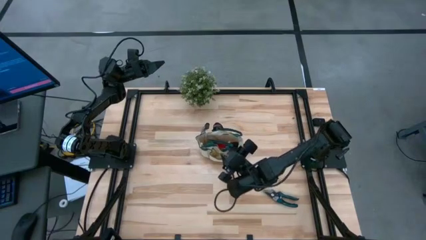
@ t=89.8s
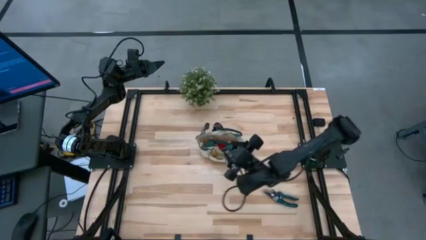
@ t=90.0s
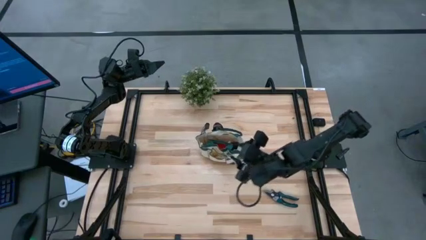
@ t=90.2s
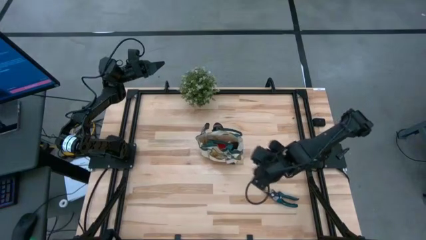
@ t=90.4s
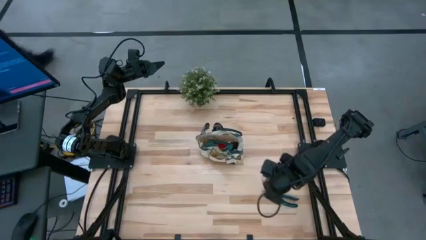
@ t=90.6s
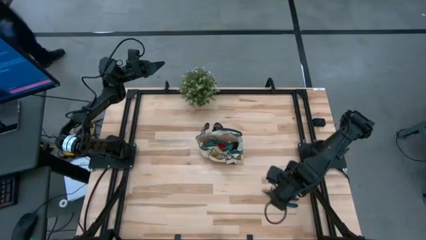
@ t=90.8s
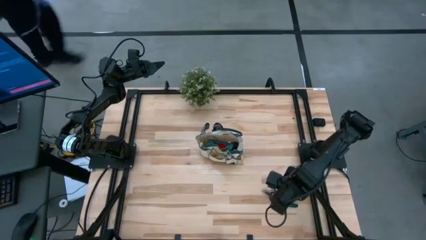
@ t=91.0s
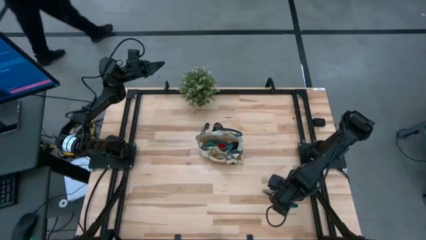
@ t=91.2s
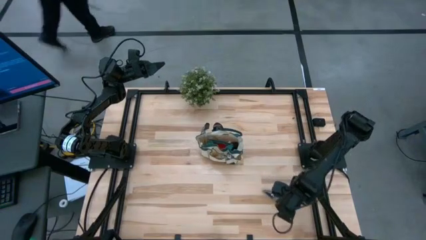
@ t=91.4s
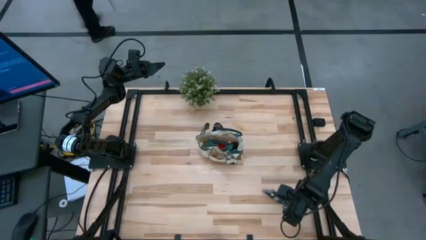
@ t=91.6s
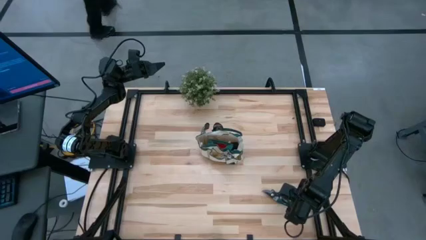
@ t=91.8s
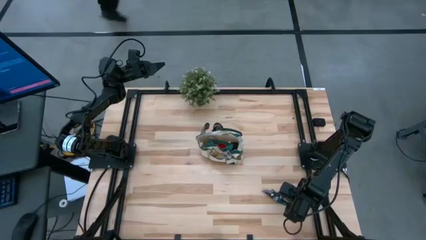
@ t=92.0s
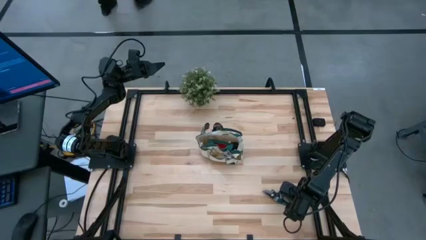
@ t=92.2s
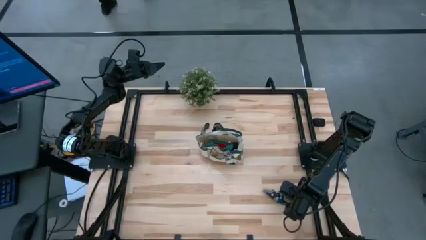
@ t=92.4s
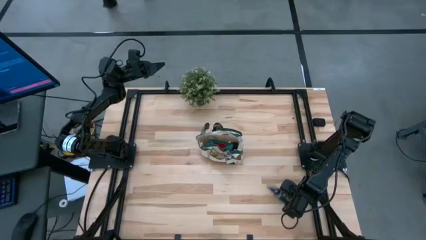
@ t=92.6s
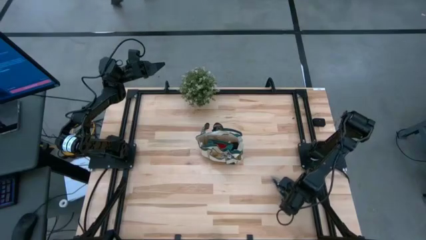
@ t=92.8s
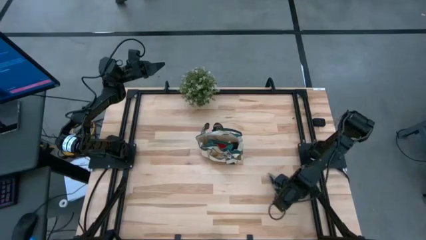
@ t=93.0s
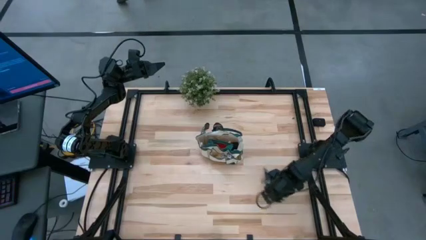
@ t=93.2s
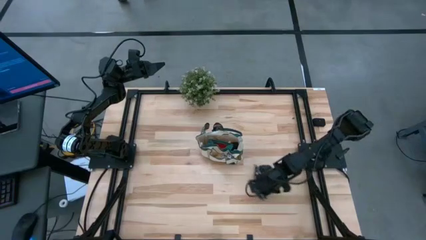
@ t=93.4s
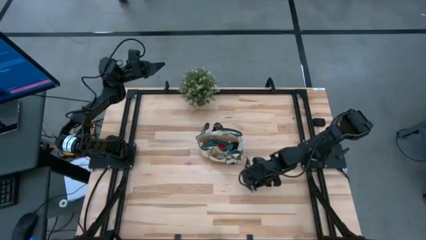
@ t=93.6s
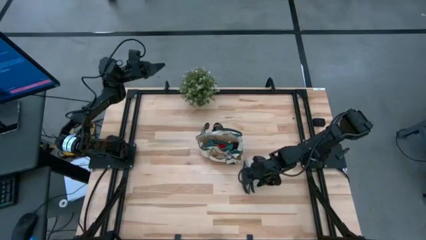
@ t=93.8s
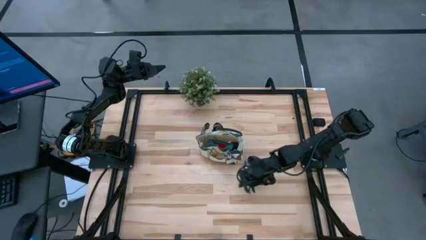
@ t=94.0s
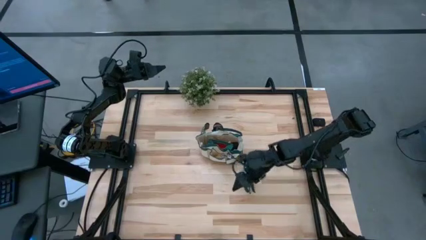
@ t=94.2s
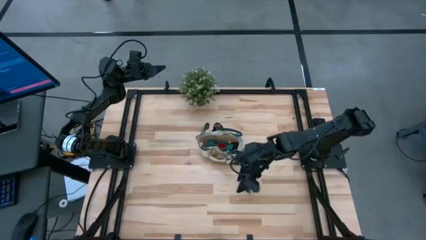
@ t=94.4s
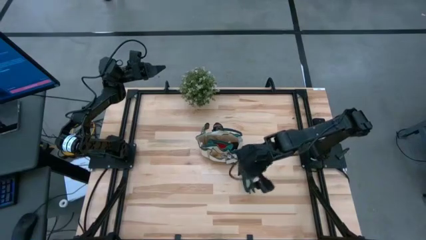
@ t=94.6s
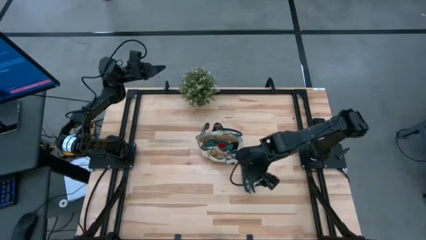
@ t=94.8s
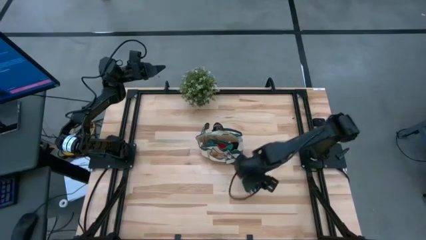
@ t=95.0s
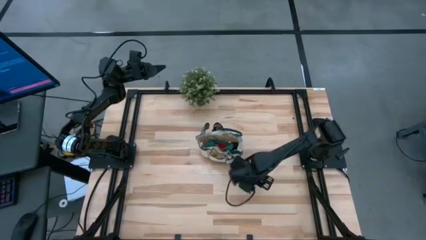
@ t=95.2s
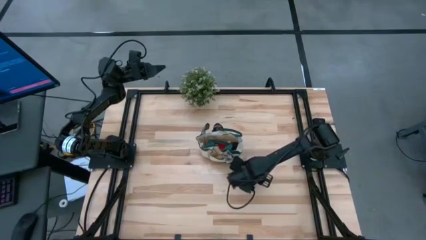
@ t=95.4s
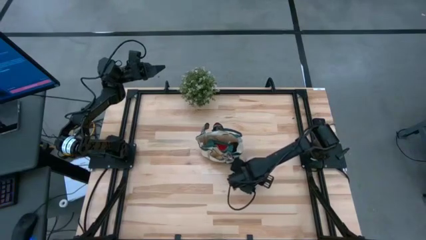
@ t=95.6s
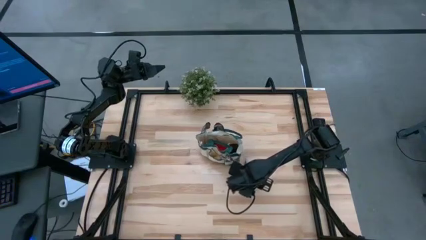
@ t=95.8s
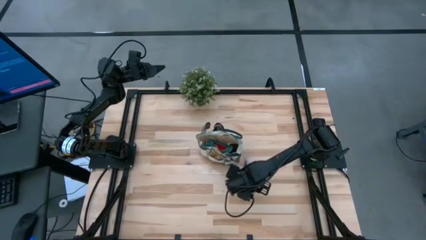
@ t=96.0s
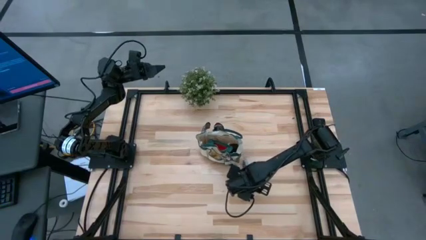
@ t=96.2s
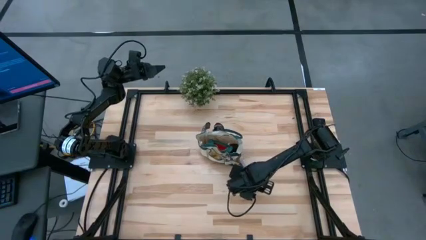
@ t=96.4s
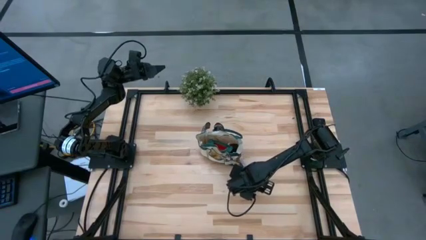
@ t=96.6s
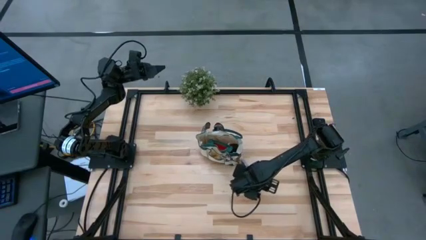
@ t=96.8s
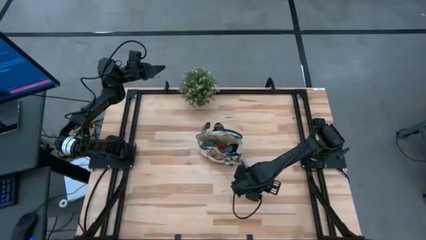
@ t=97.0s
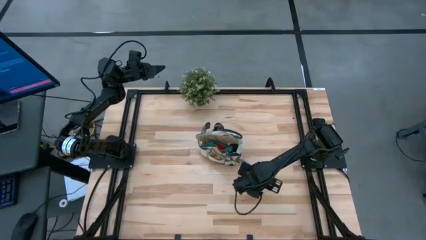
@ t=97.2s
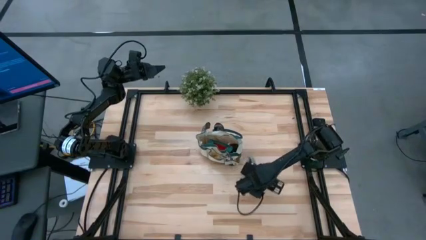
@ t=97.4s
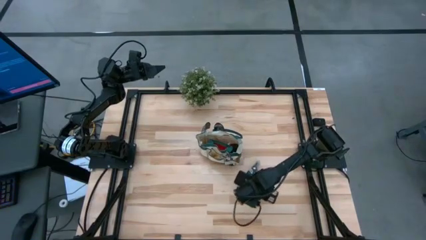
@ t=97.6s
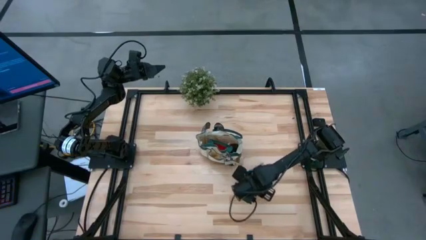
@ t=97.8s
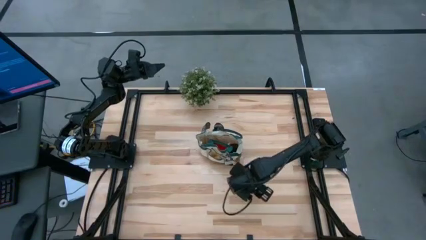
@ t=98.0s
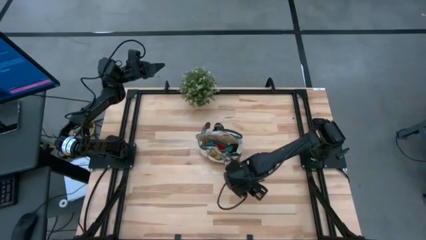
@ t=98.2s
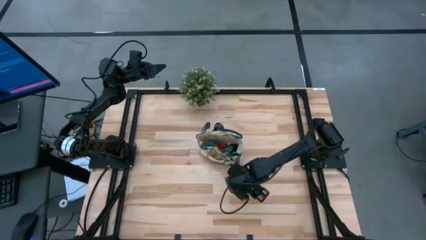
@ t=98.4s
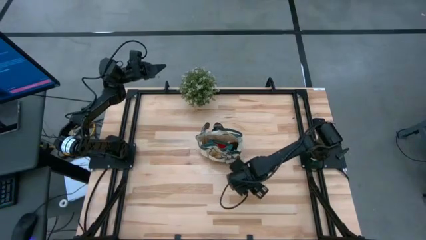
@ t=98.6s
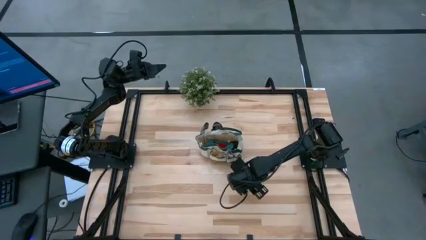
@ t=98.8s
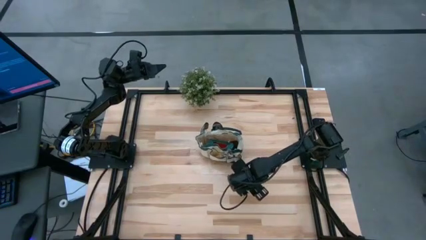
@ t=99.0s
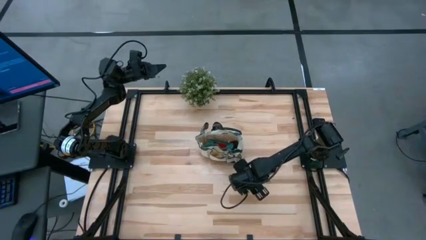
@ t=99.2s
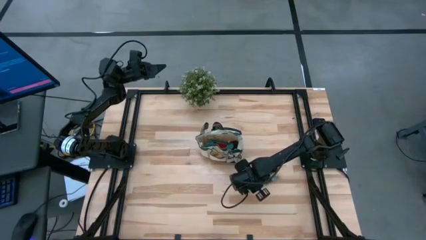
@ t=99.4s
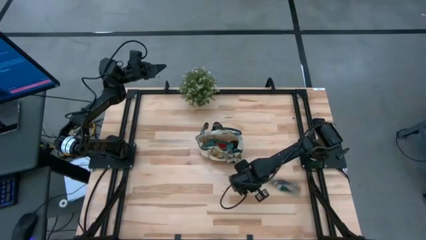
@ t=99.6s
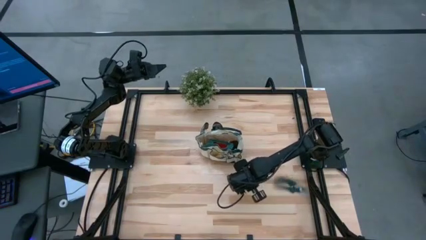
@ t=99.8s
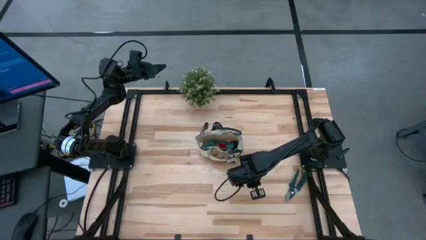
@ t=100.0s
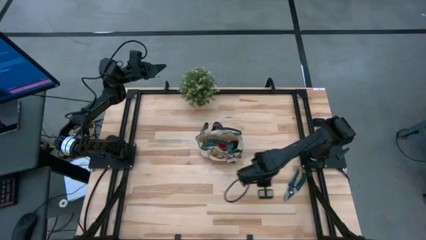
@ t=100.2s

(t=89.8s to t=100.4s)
Task: Pick & Place Garden tools in Gardening bag
Put the green shear scissors into the white gardening bag
